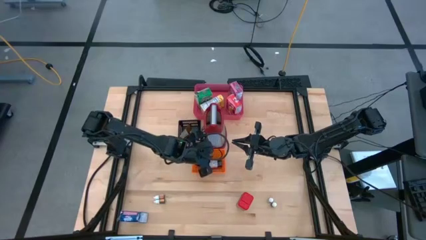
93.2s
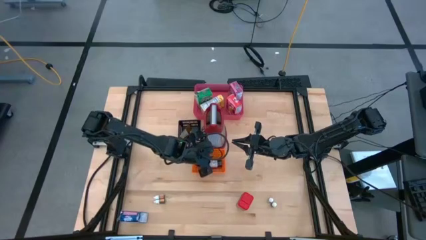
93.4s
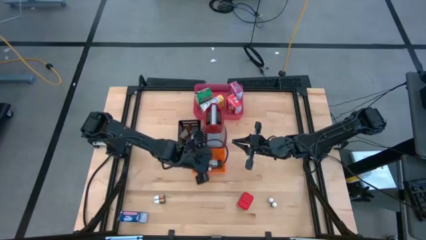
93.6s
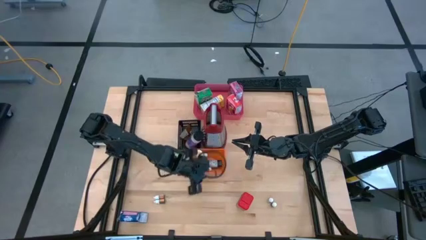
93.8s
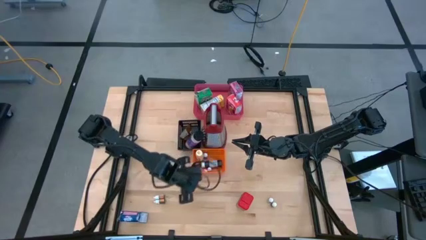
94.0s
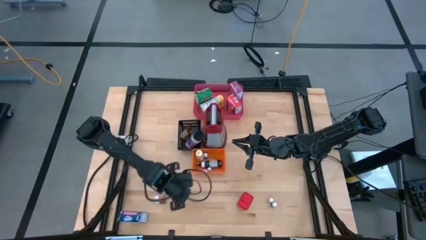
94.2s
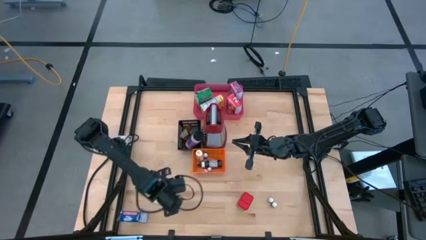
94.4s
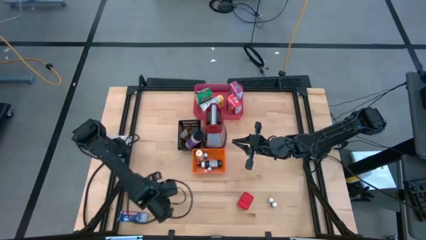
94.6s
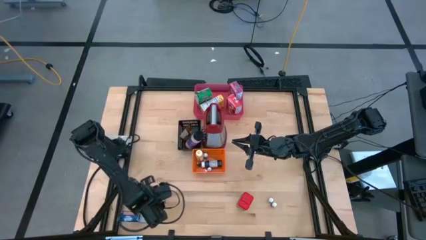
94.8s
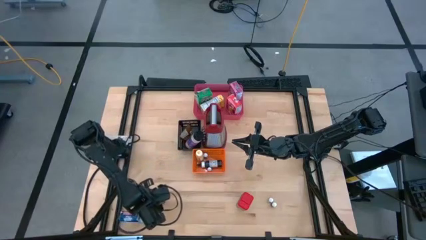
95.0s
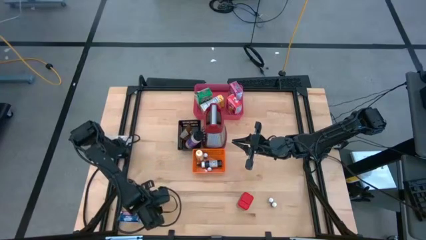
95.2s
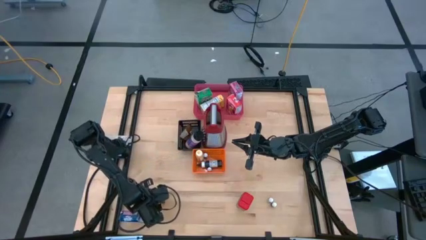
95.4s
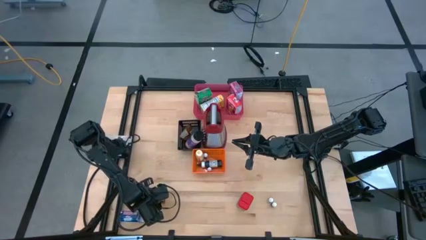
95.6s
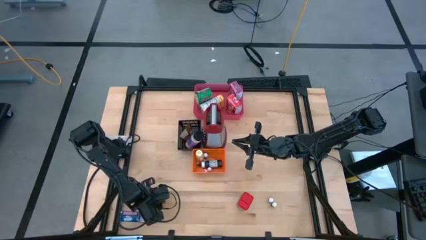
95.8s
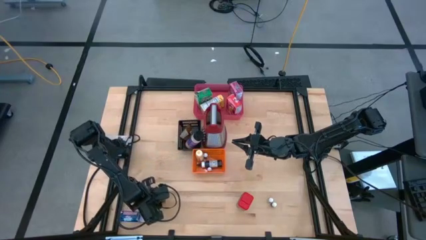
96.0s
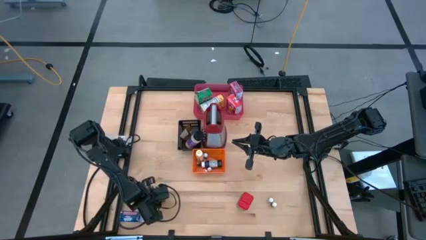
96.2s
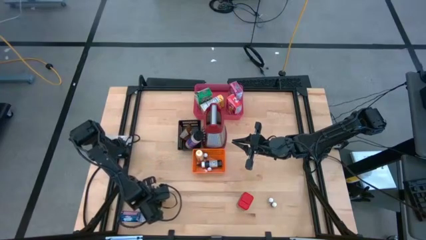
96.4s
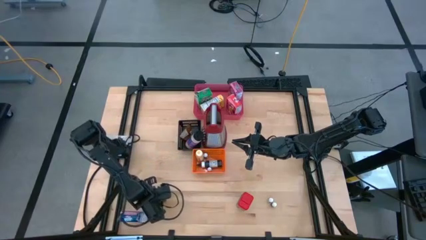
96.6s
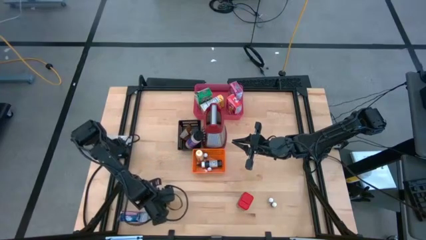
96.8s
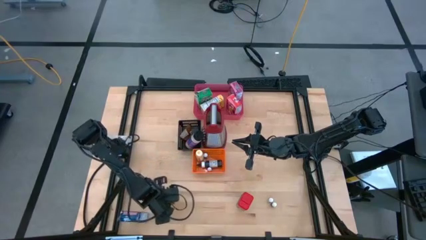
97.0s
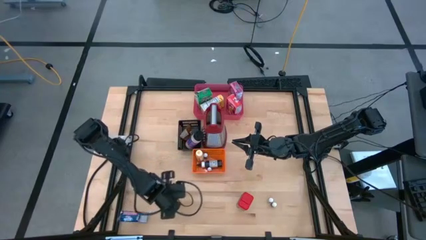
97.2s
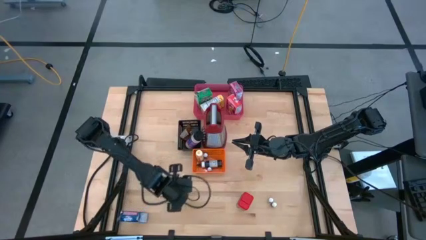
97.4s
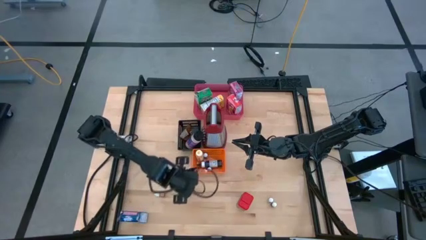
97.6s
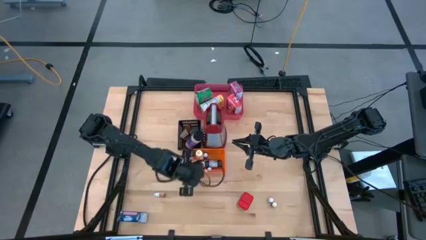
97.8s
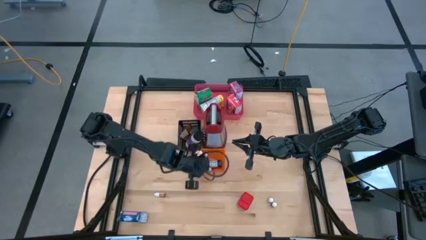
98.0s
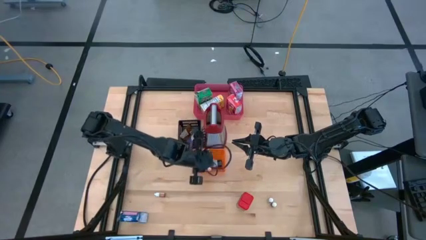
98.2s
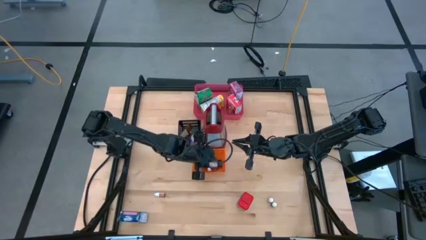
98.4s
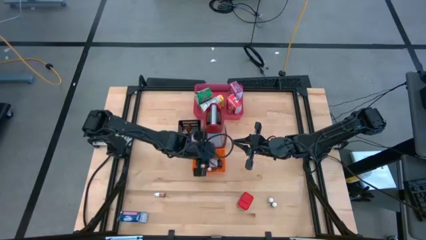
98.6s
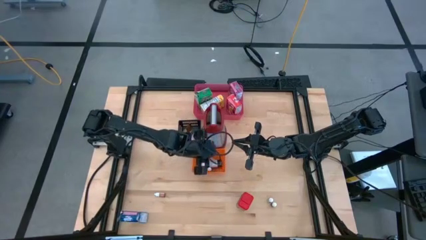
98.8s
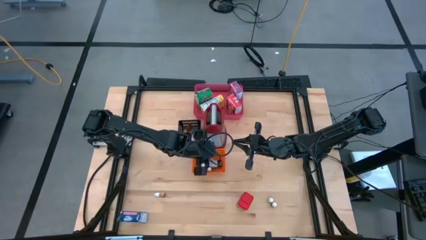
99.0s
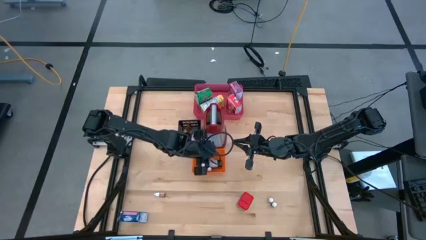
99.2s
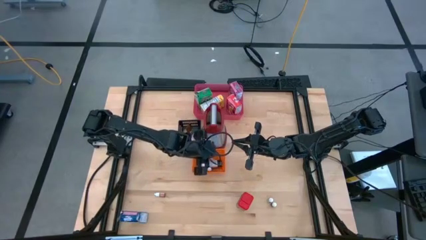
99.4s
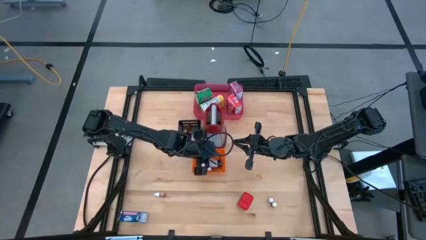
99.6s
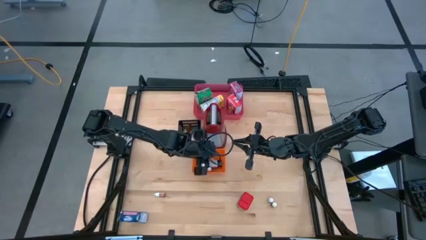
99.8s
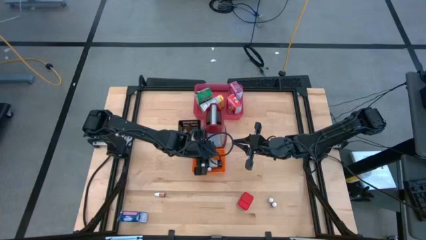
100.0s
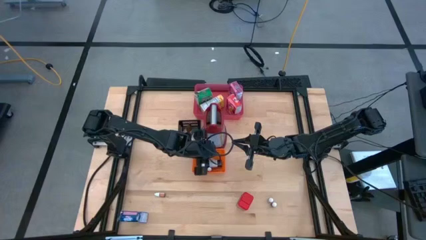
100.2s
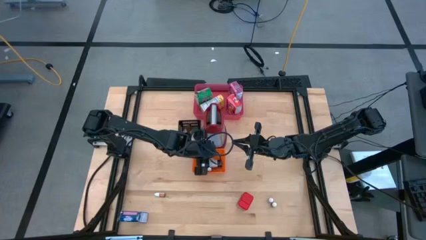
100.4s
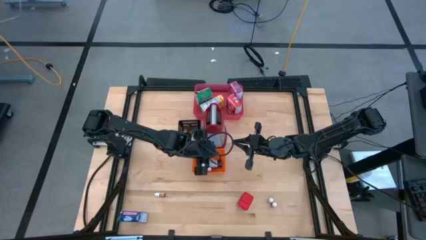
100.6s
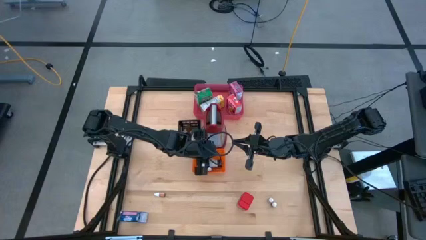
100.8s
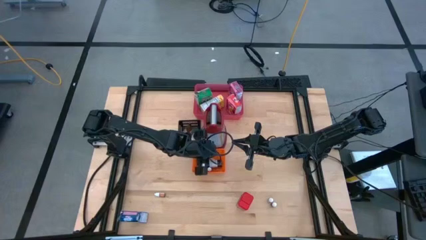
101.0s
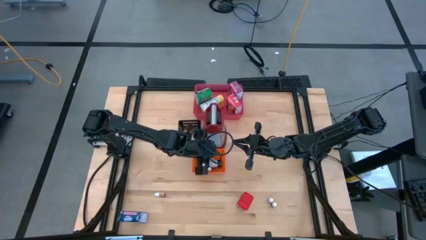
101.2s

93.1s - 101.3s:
Task: Pick & Place Kitchen Items
Put the small yellow food coloring bottle into the orange bin

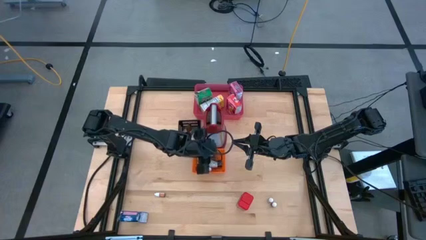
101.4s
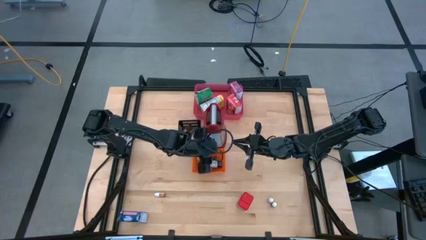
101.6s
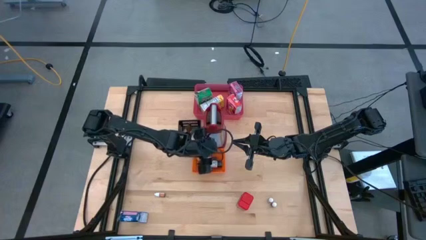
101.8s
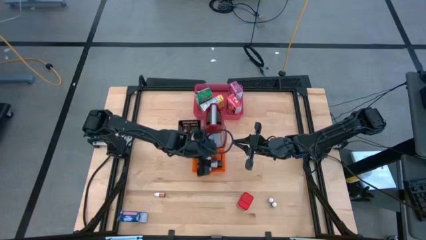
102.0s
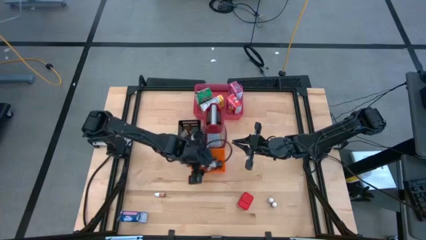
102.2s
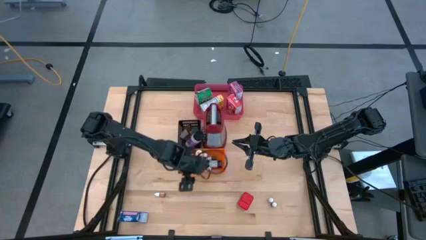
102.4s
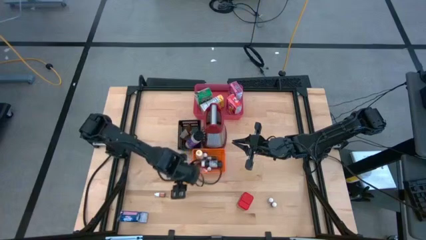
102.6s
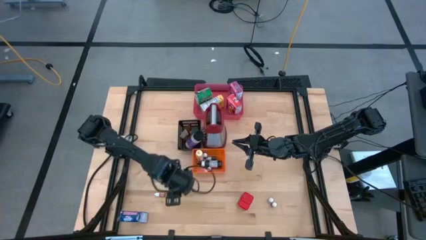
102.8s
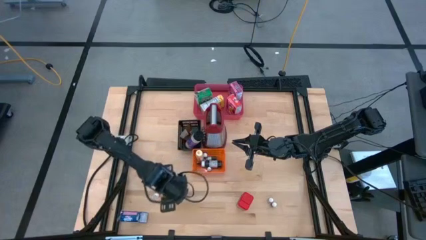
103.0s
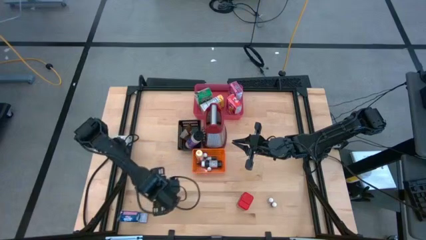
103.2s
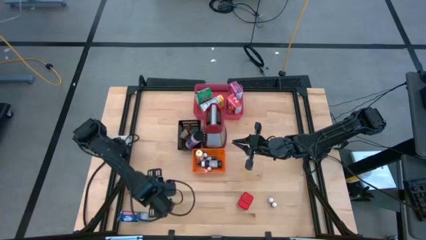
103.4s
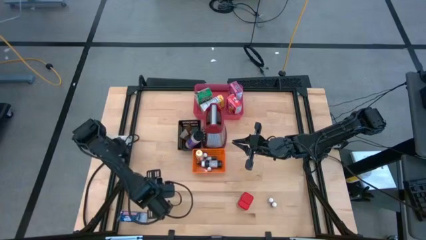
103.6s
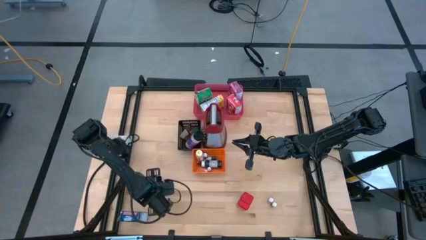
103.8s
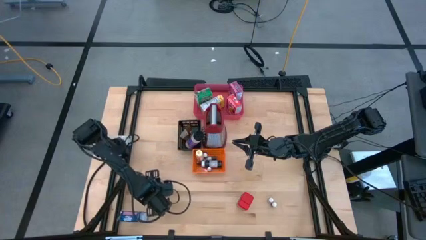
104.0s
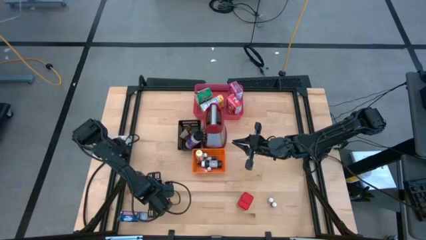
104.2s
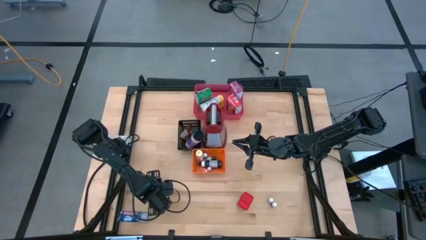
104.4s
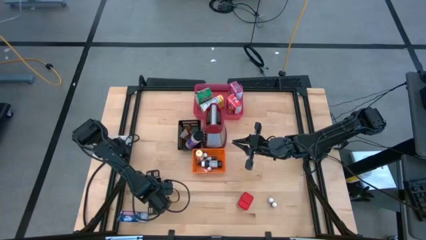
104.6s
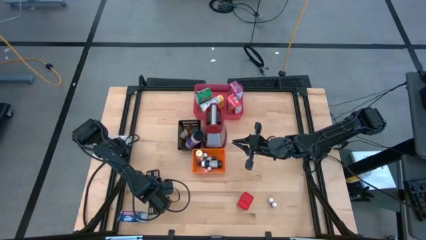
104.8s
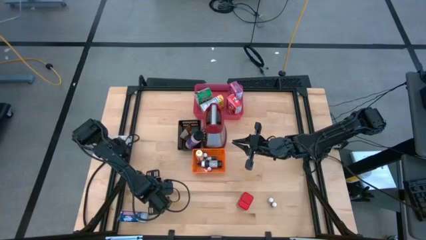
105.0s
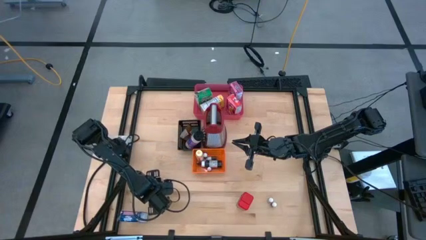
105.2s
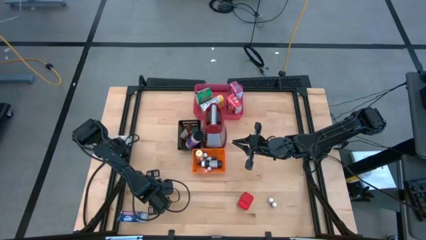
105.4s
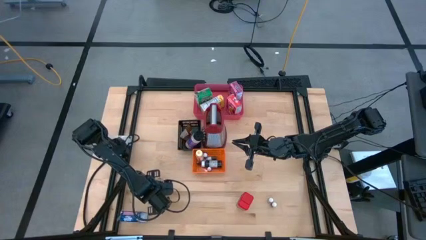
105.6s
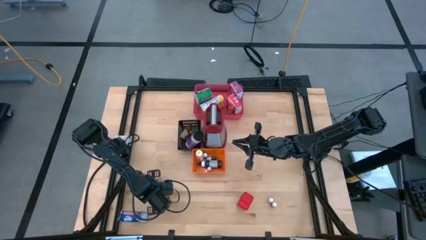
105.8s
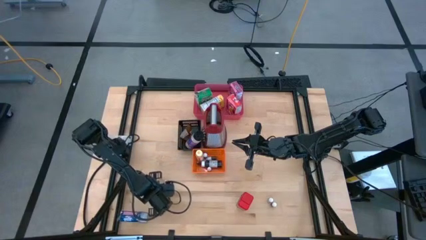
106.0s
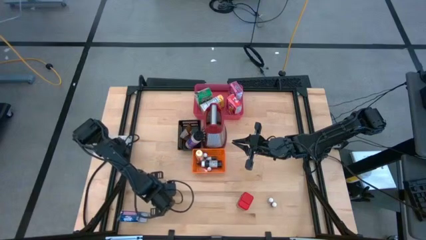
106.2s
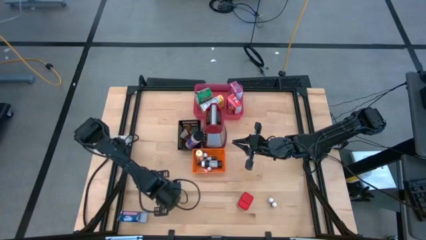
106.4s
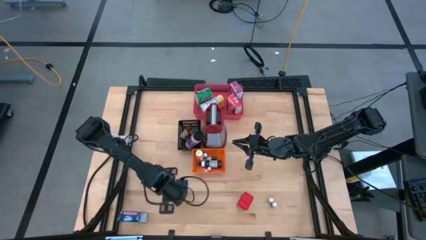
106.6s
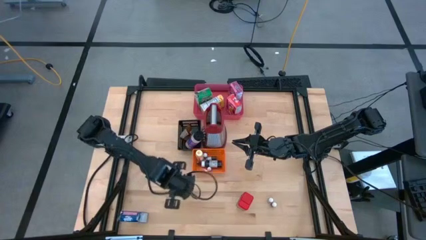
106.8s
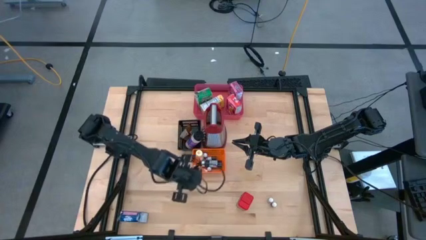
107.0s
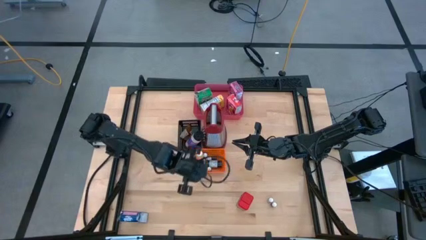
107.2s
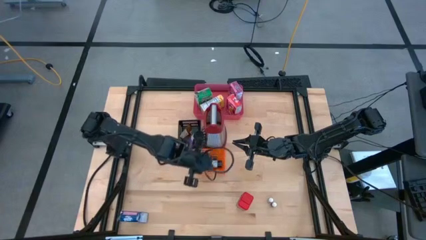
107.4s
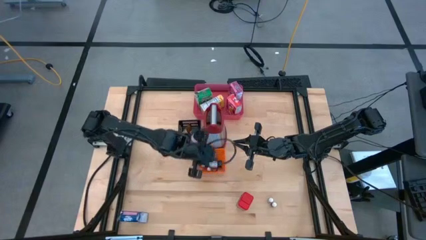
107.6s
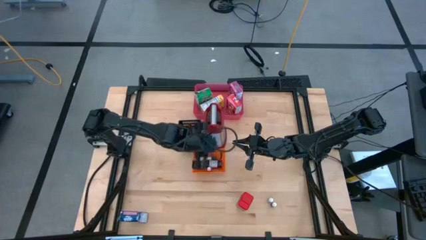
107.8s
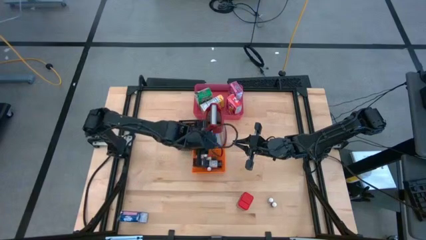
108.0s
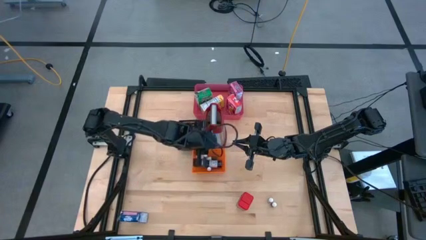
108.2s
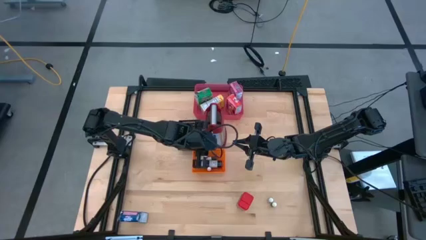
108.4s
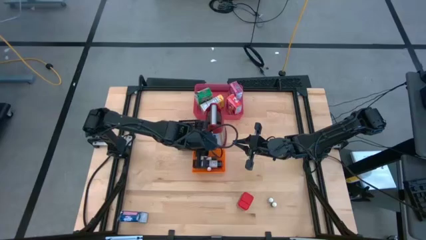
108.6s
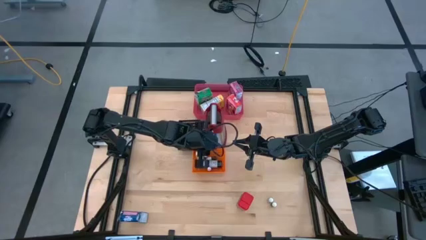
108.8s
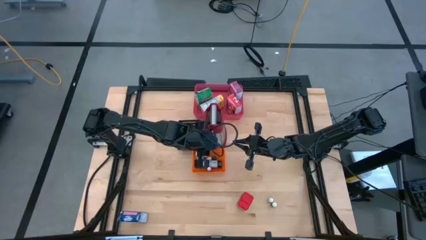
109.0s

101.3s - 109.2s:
Put the orange food coloring bottle into the orange bin
